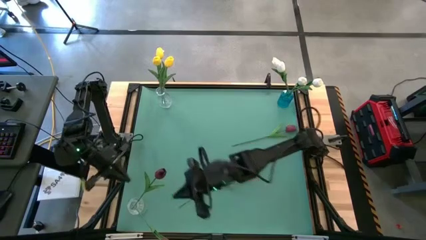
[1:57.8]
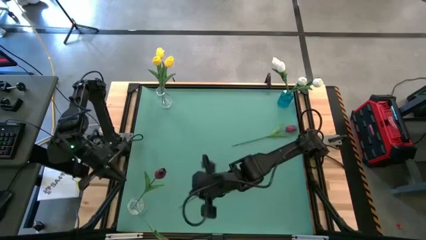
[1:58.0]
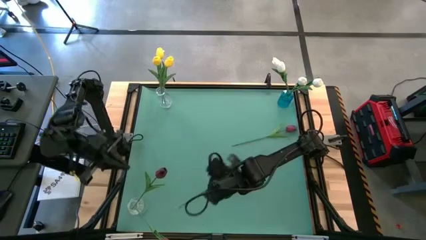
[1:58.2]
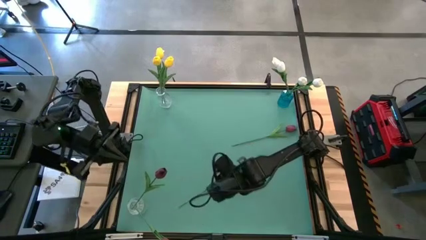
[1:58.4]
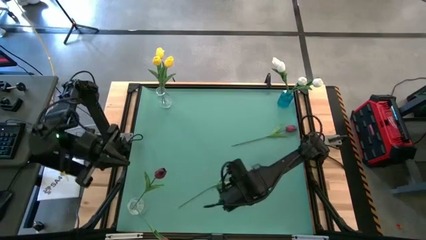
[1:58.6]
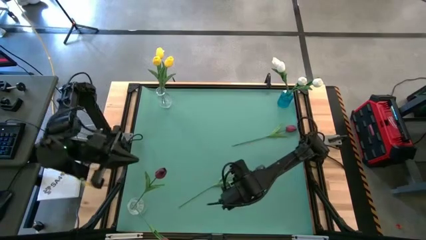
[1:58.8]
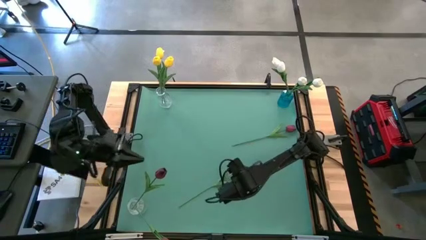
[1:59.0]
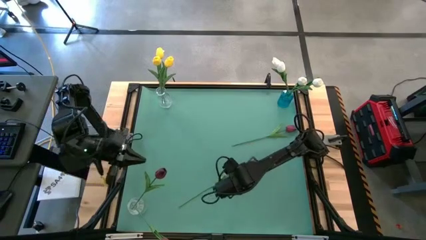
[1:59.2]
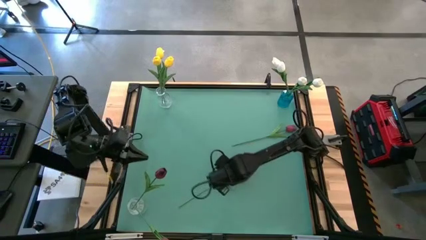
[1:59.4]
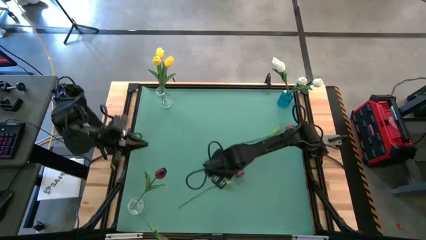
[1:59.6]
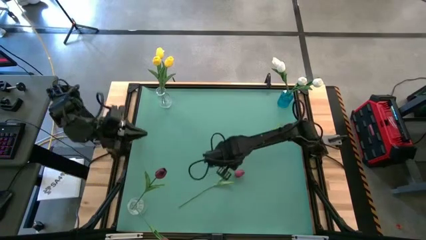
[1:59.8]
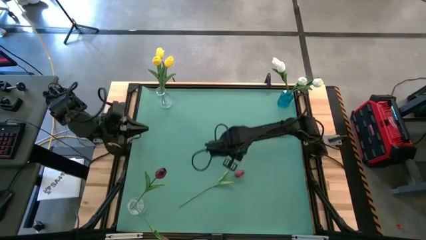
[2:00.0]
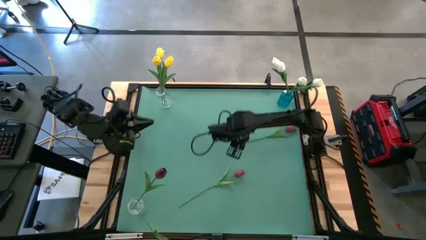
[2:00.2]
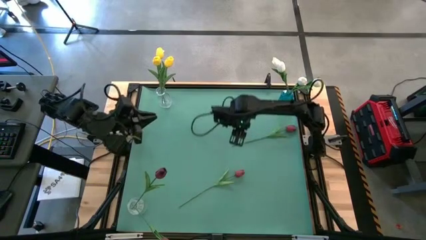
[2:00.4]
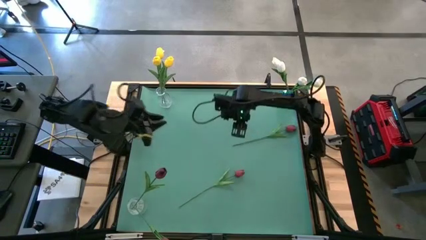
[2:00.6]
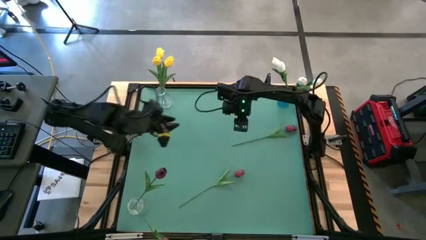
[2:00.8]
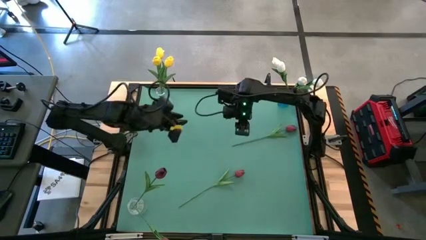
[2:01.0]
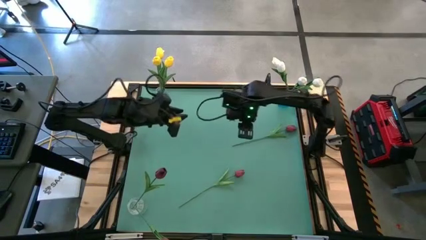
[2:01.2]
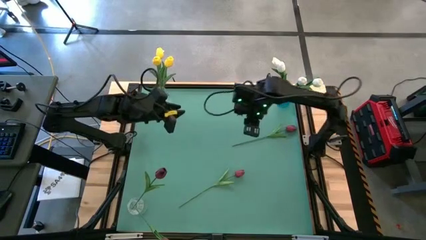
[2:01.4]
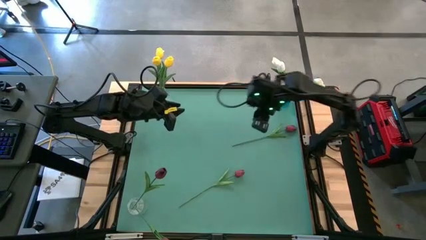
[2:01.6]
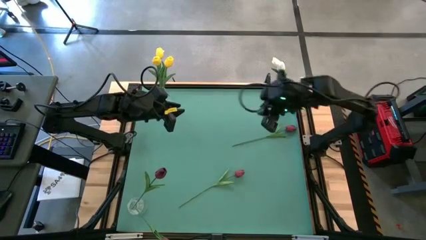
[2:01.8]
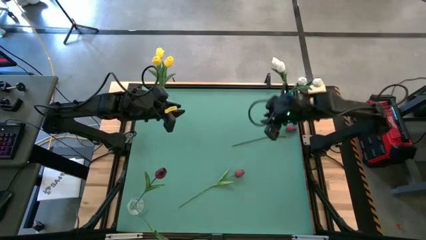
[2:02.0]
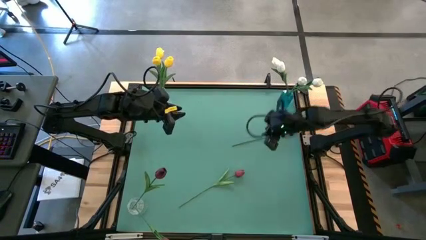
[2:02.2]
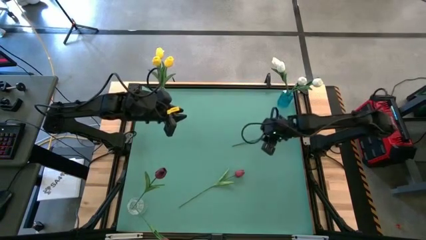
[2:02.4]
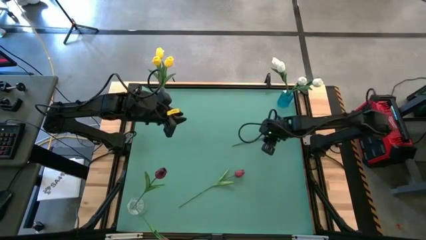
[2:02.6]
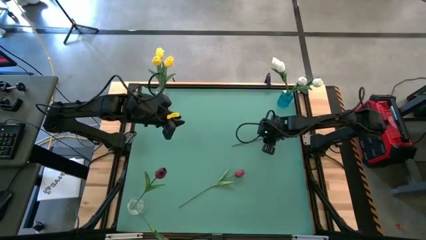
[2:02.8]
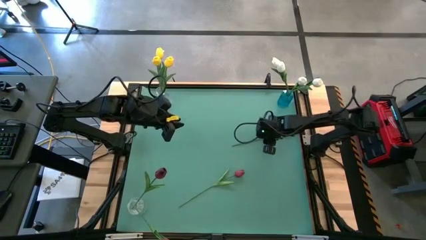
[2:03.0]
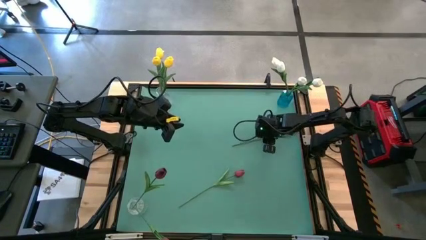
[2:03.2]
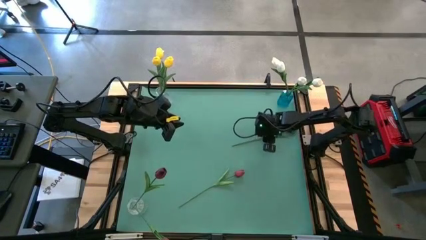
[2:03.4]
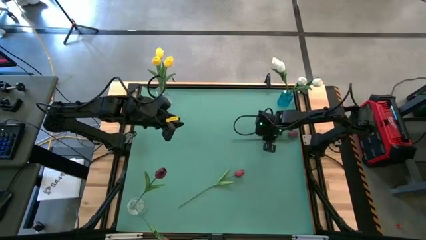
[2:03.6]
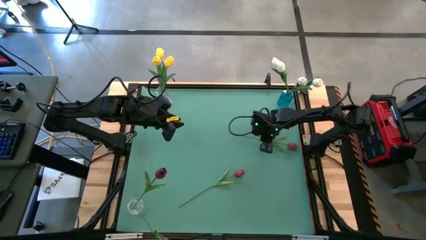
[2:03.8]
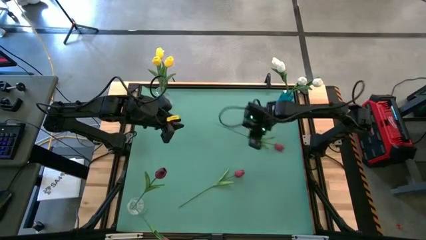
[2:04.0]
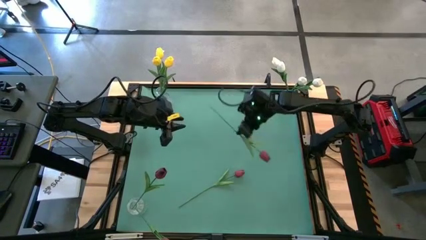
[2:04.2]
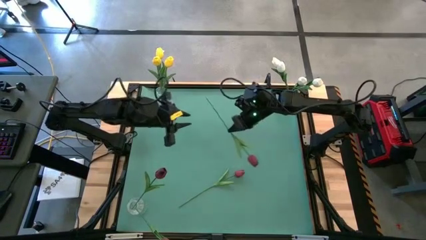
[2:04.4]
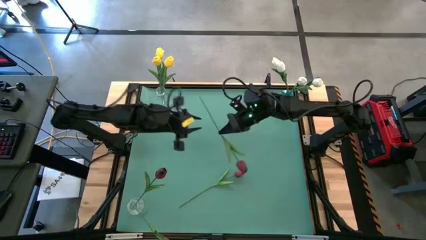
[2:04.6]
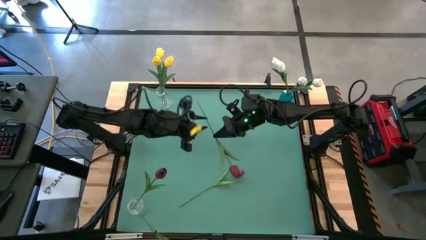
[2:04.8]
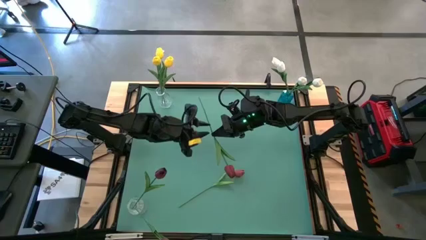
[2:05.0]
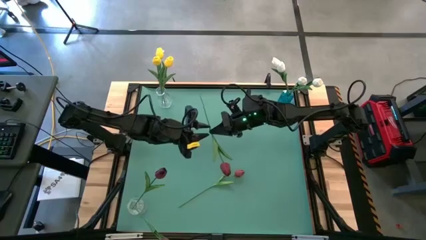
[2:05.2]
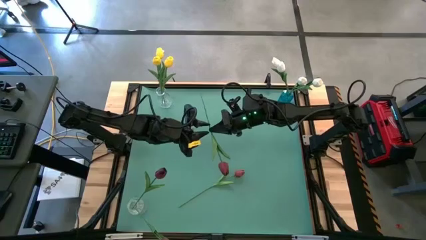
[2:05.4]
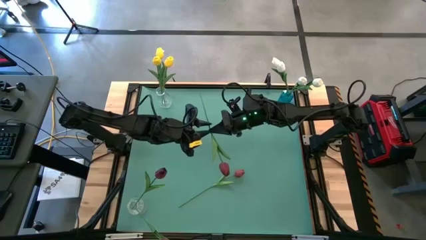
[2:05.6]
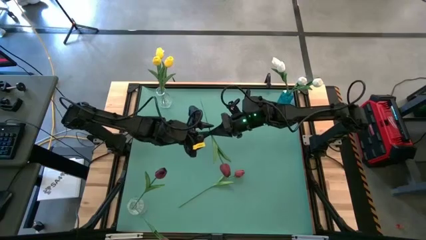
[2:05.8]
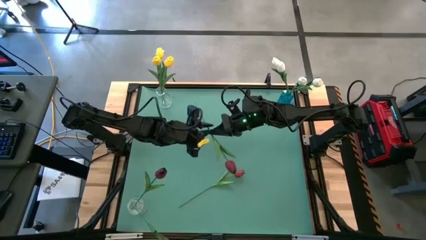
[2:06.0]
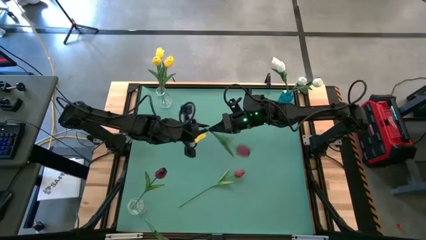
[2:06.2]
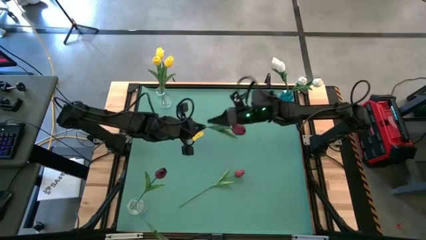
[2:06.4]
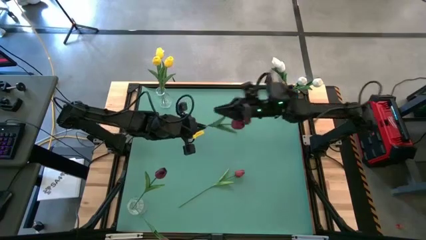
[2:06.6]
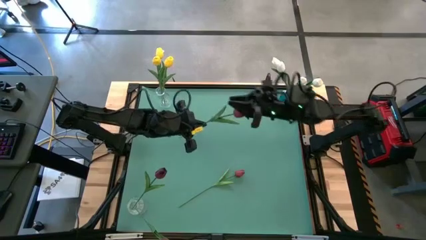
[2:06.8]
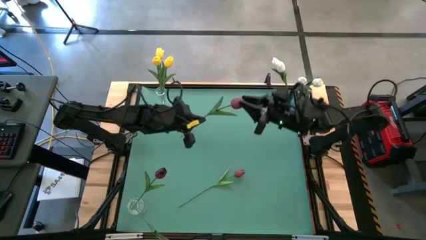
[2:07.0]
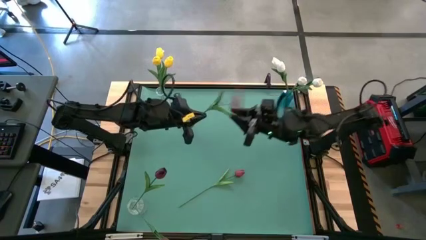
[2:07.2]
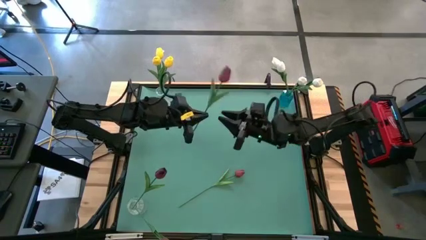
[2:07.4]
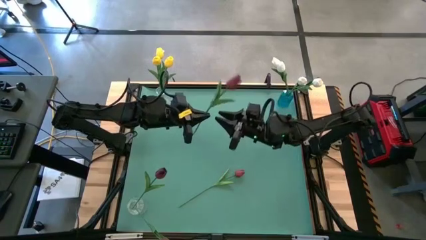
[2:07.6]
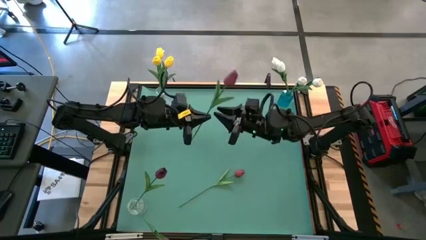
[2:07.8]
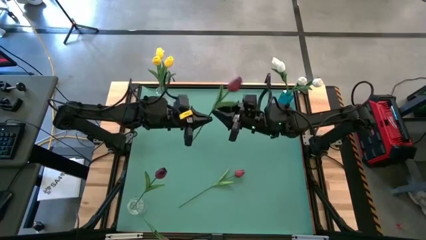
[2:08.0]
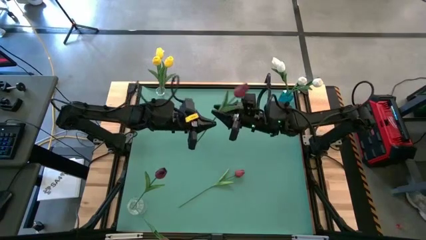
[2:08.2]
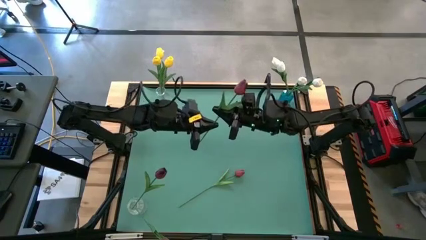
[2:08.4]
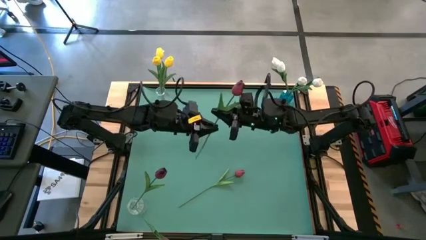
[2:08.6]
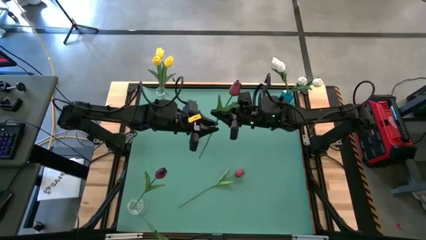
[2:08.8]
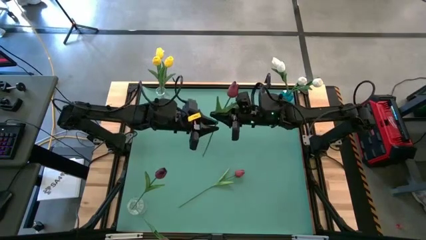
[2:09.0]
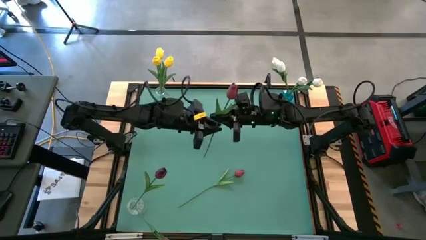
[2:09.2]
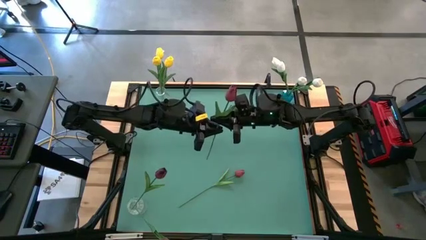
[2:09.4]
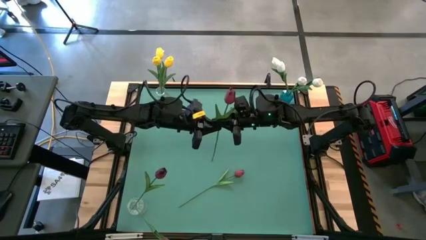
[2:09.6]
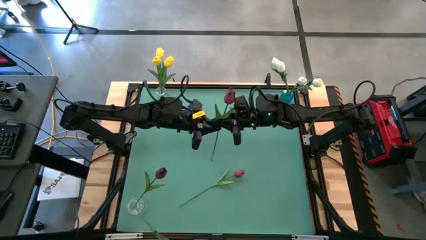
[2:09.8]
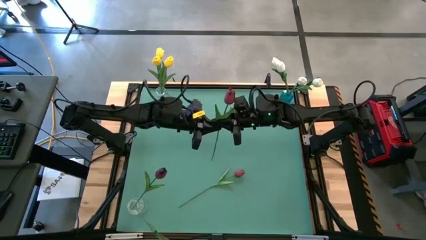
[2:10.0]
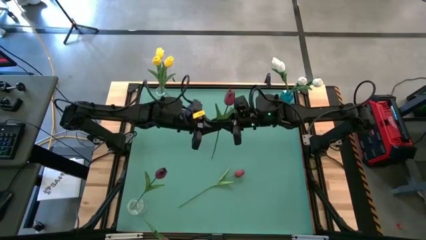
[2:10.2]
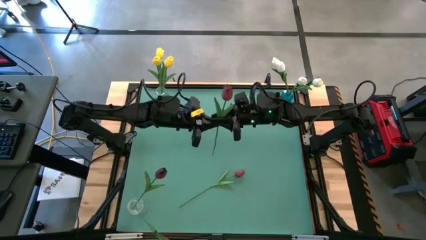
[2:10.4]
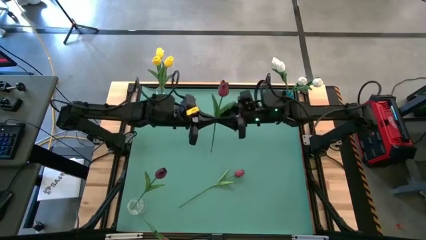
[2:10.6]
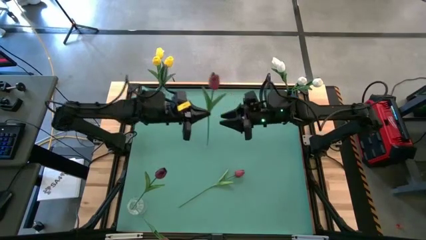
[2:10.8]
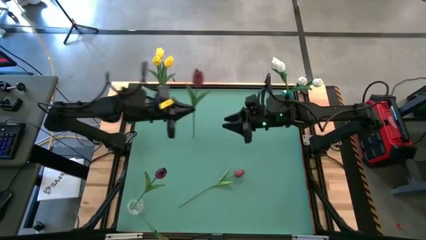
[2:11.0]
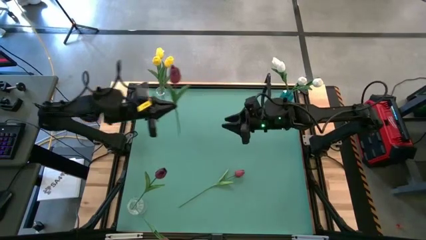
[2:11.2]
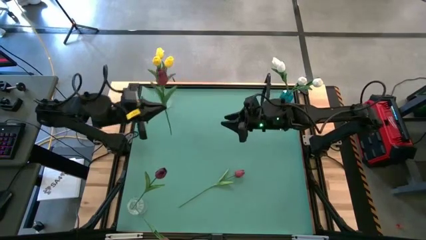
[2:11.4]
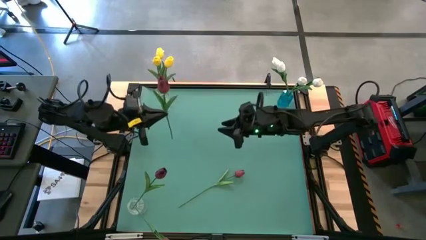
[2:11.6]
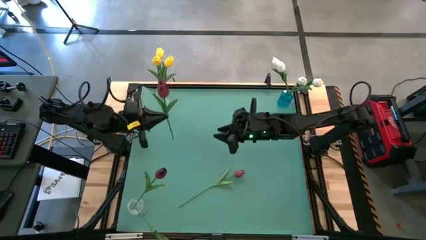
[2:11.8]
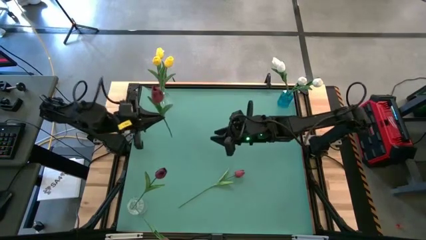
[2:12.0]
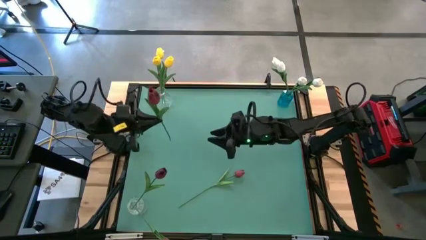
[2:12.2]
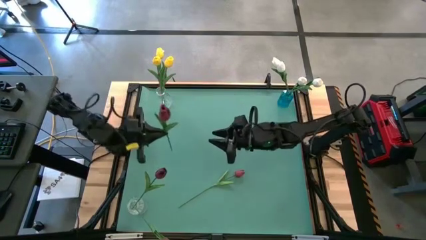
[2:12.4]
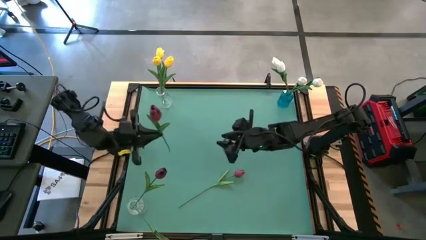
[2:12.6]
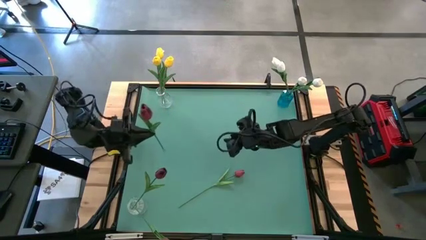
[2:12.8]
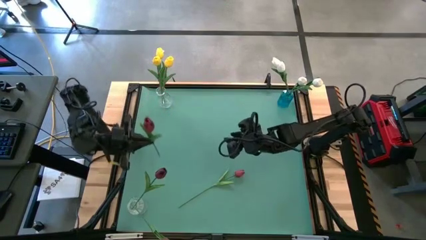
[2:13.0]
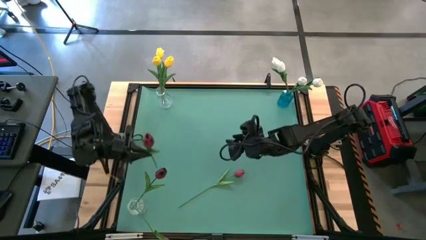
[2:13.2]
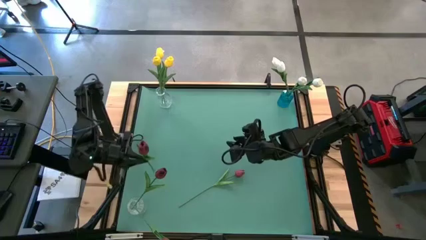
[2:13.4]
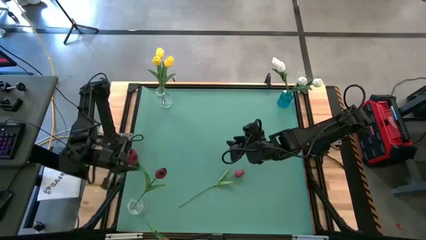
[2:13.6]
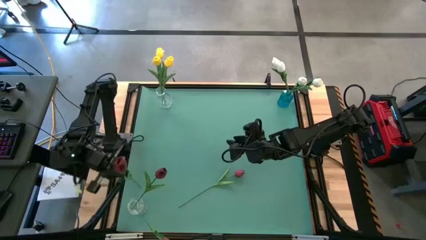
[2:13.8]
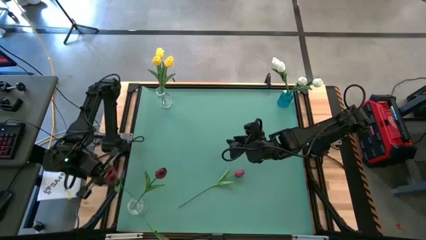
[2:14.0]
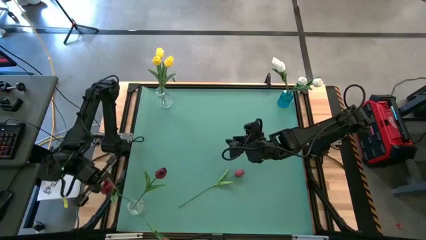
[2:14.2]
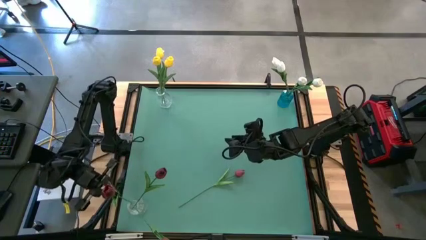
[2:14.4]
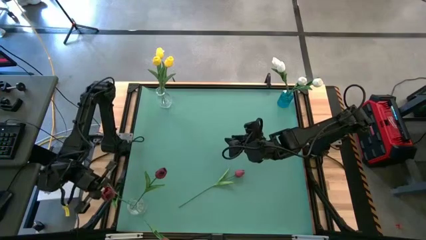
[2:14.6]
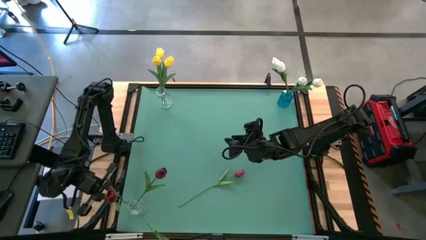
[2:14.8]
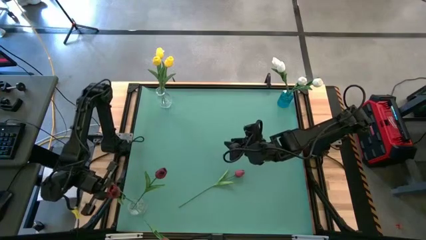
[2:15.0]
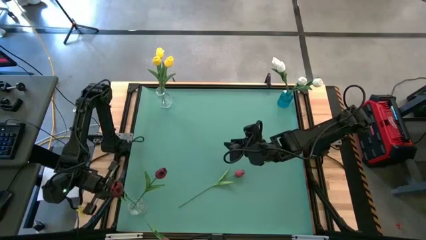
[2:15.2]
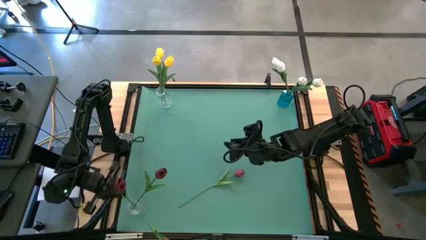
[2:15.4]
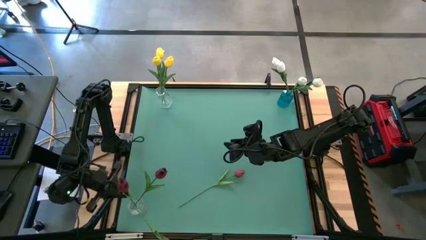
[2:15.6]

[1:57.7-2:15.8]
Task: Sort flowers into vase by color
Put the top red flower into the bottom transparent vase
